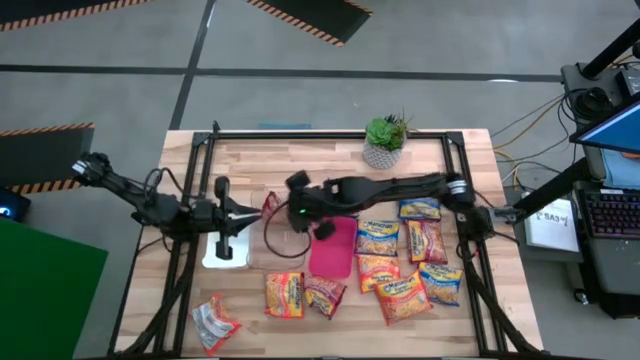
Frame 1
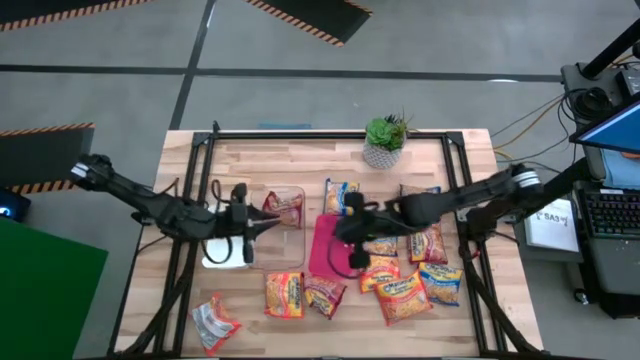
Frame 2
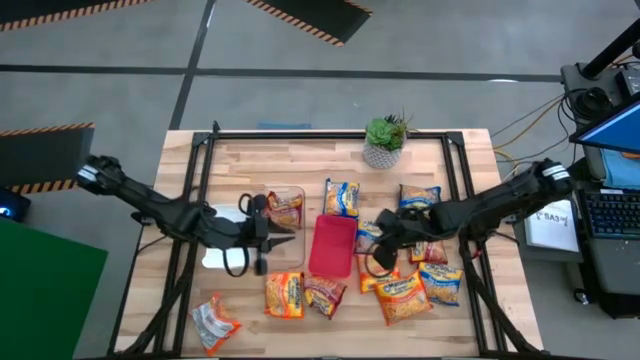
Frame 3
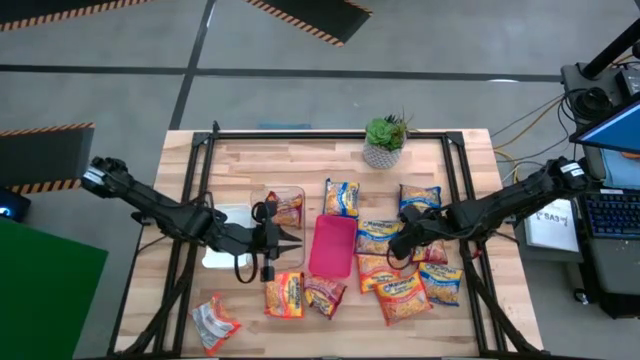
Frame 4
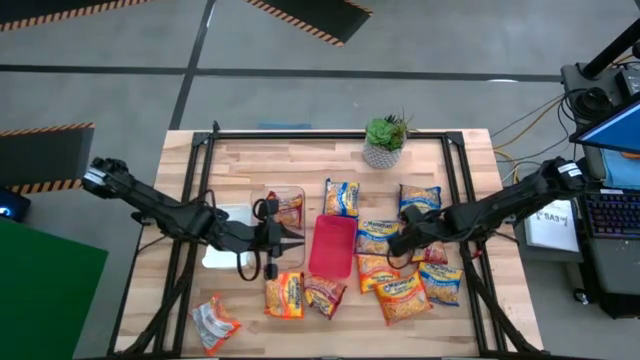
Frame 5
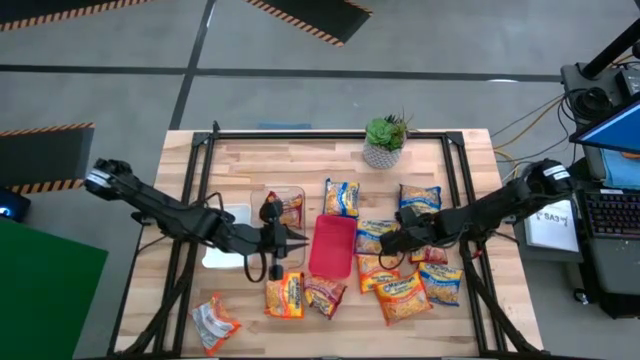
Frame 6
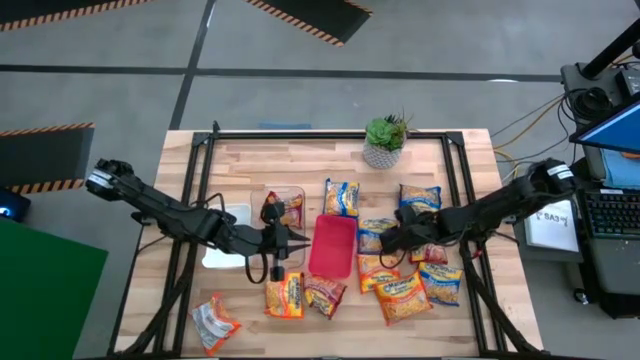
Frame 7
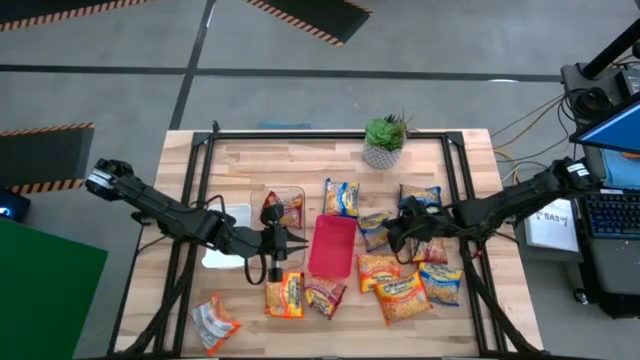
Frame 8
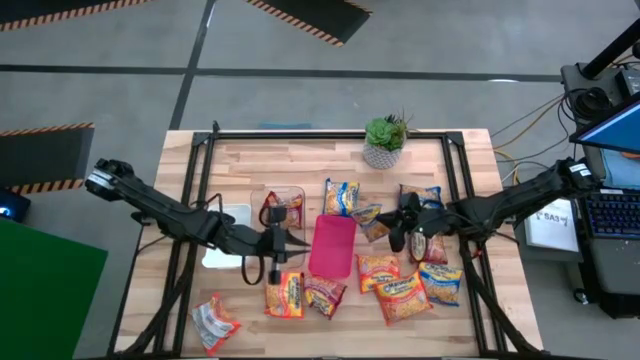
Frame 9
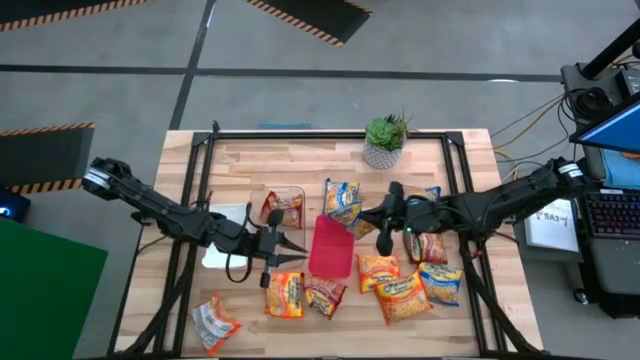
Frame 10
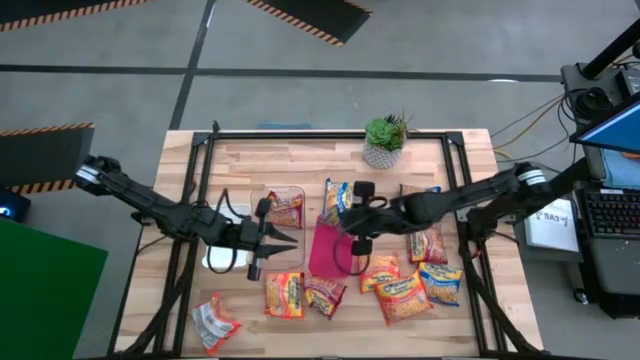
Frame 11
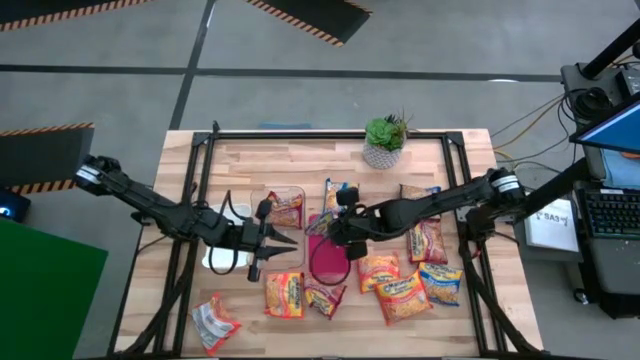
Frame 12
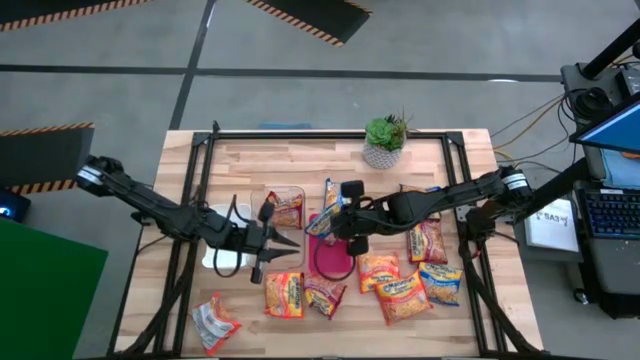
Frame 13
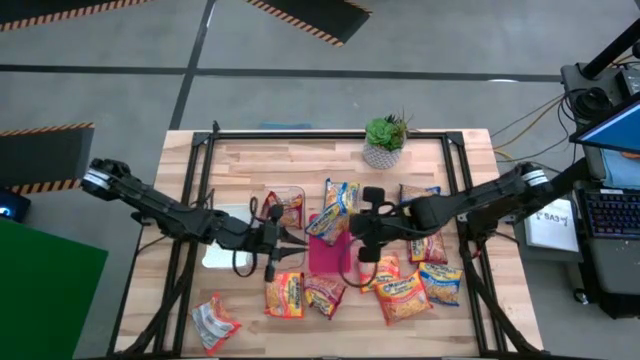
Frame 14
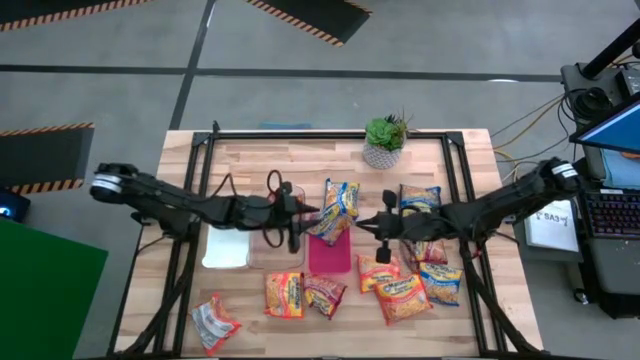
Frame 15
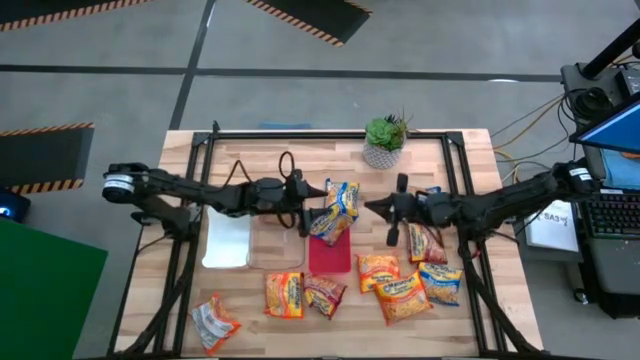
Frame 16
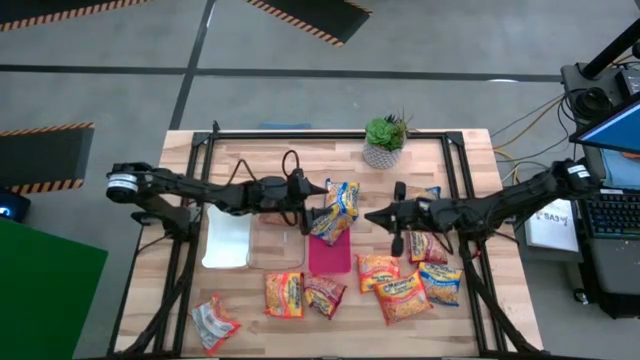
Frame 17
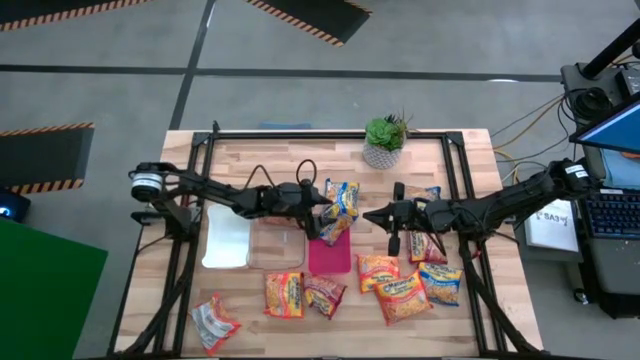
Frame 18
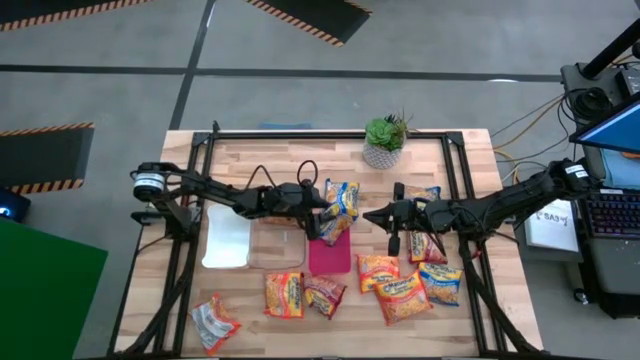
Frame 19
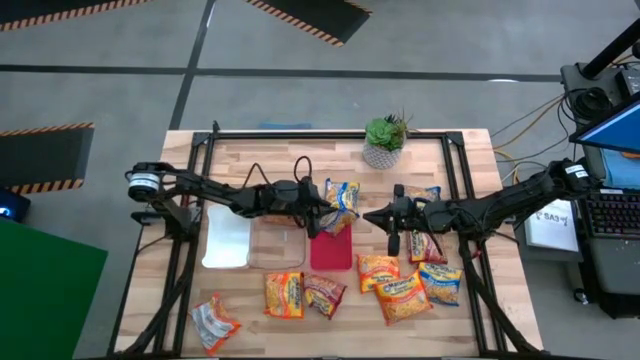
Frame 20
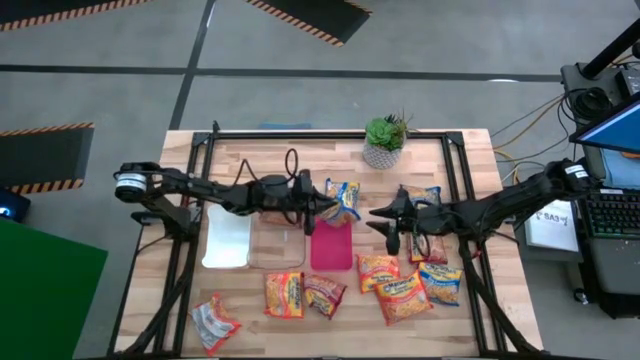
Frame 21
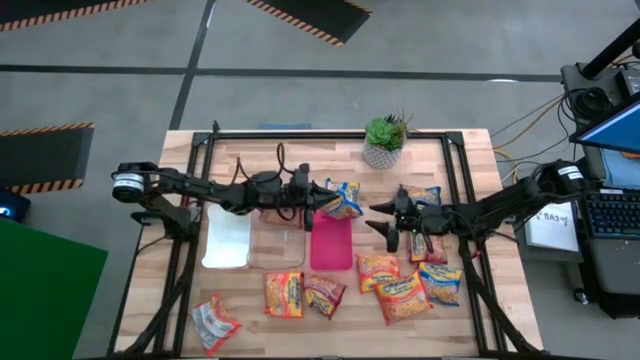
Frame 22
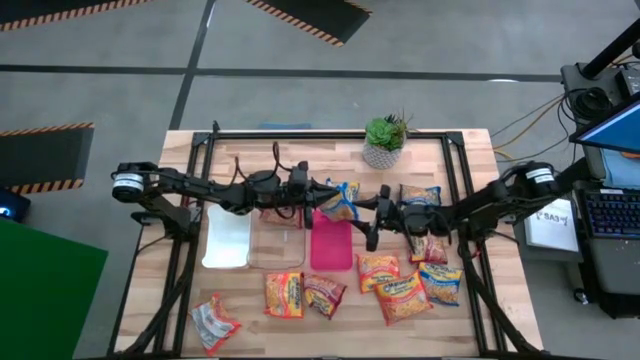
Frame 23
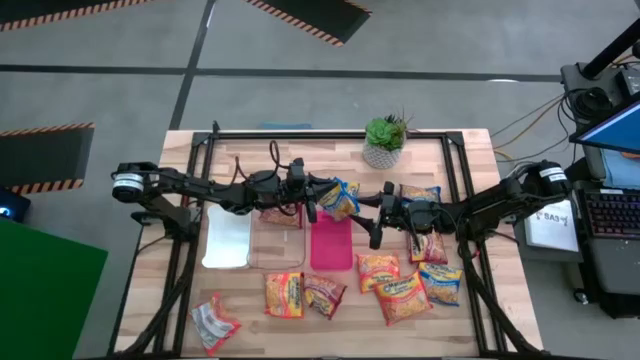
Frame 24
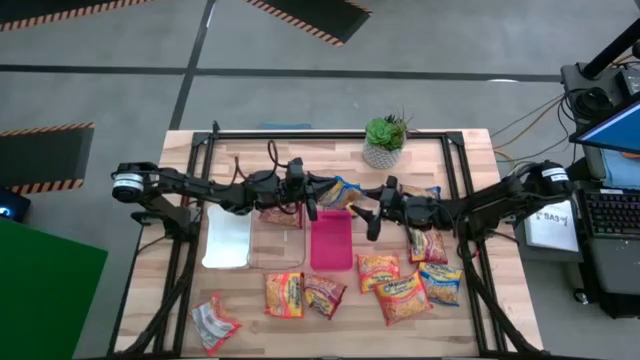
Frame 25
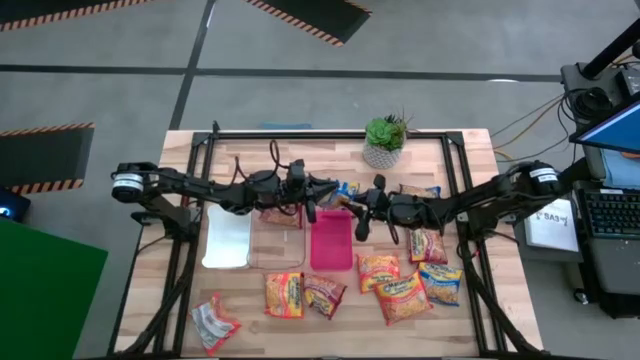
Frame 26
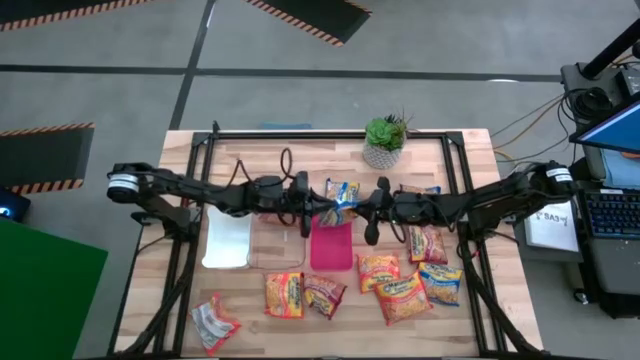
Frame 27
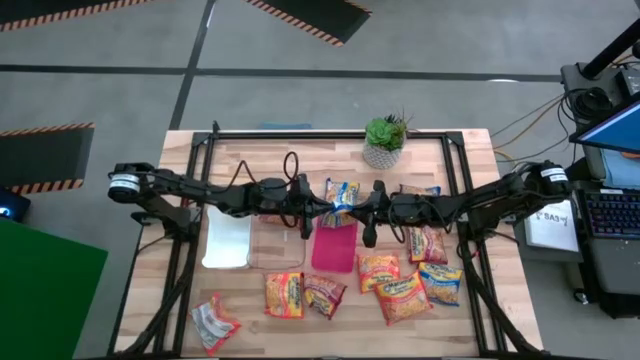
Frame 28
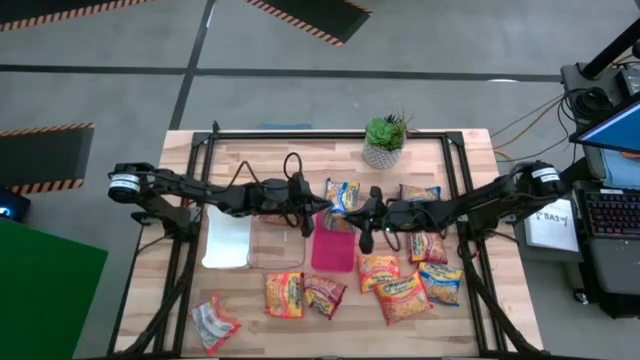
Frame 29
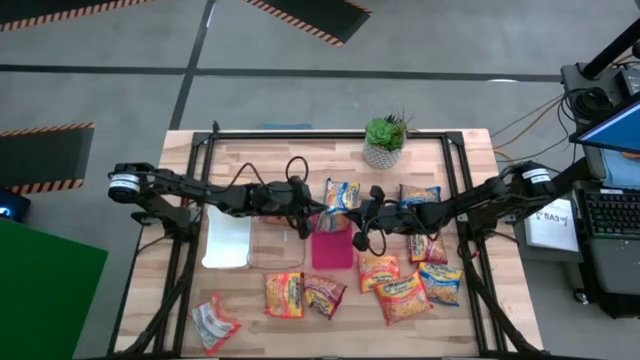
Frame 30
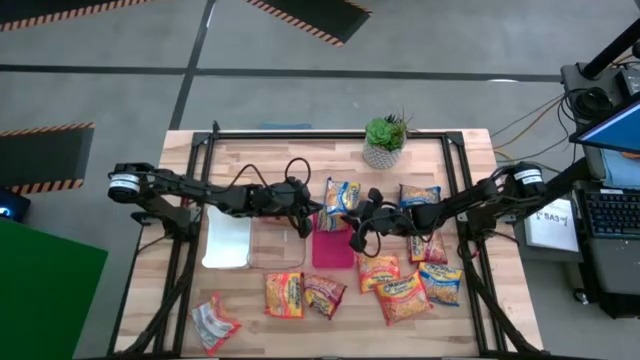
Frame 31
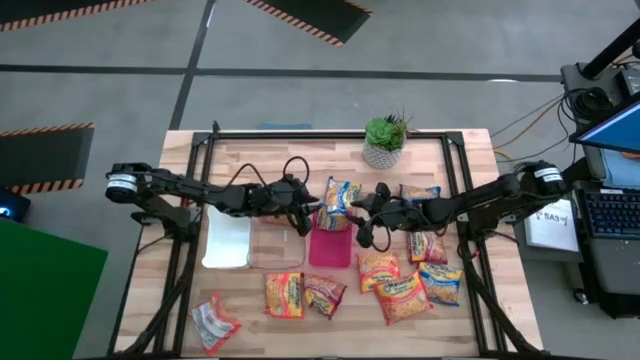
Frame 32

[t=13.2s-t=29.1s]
Task: Sort Maruchan noodles
Put the blue noodle pack into the red bin

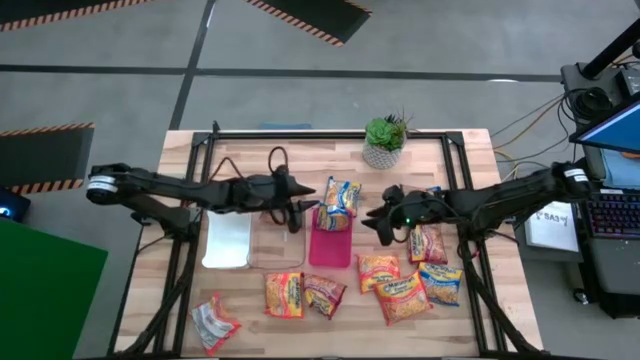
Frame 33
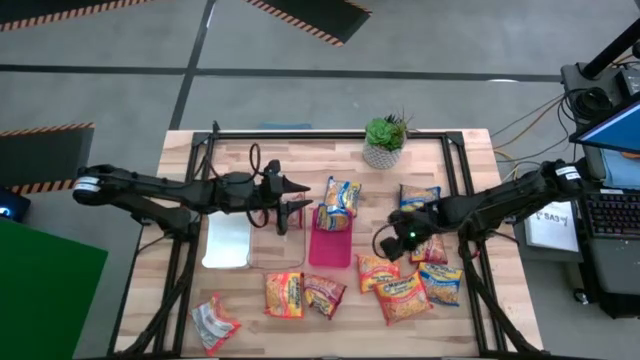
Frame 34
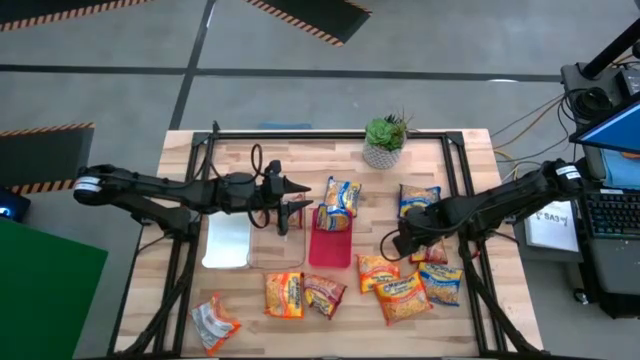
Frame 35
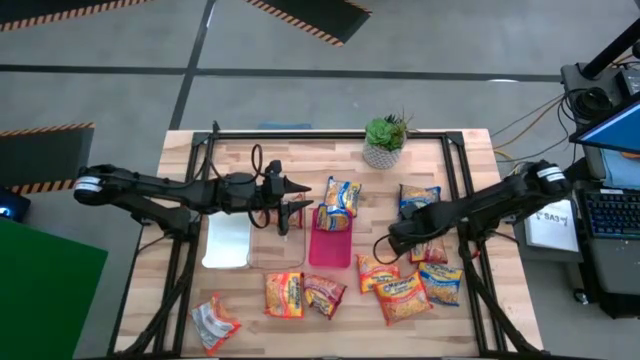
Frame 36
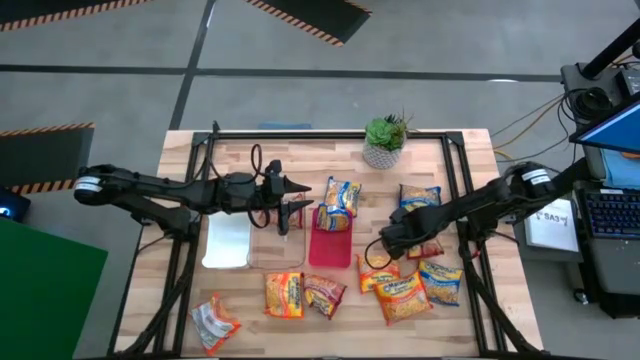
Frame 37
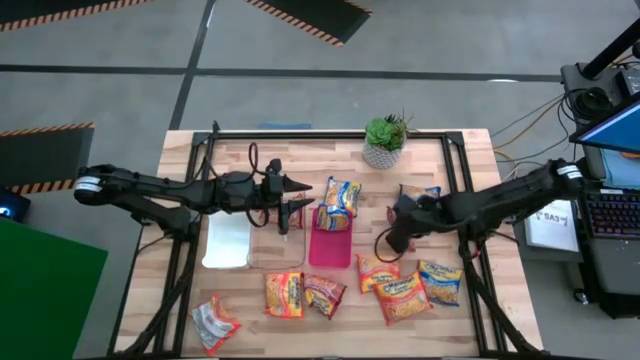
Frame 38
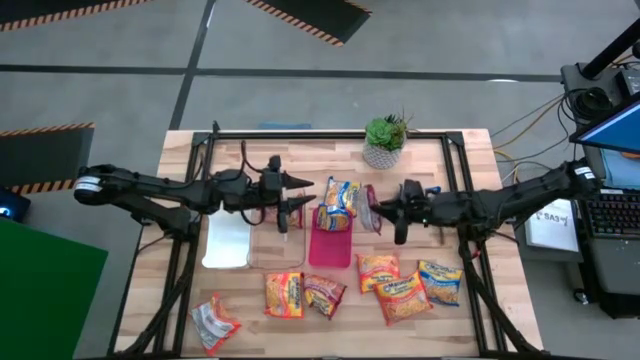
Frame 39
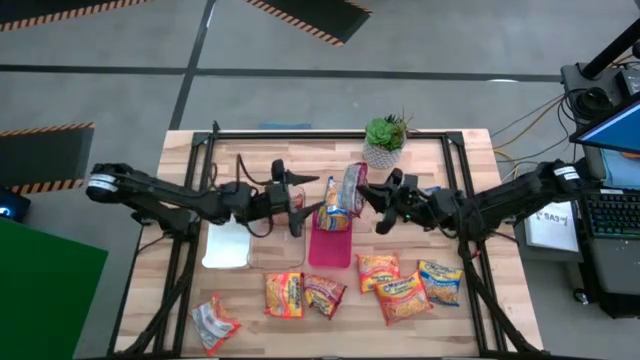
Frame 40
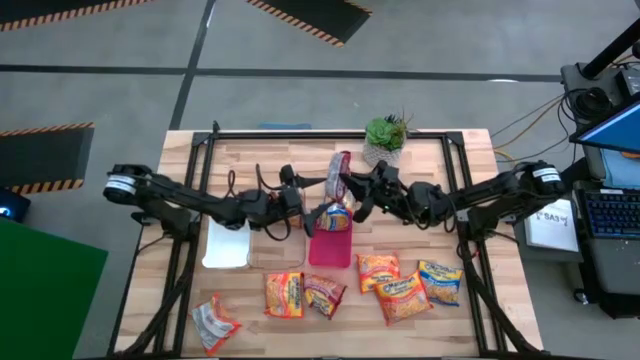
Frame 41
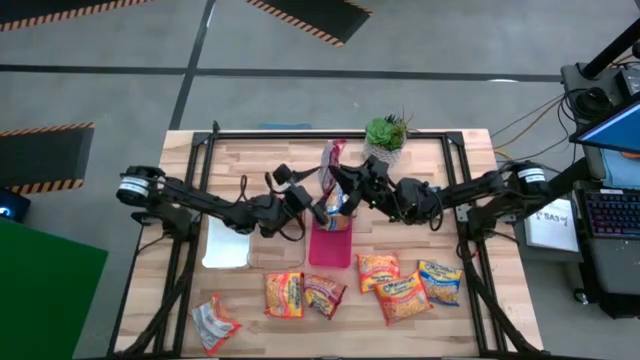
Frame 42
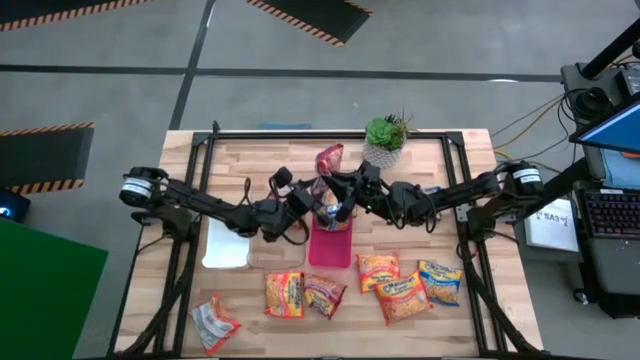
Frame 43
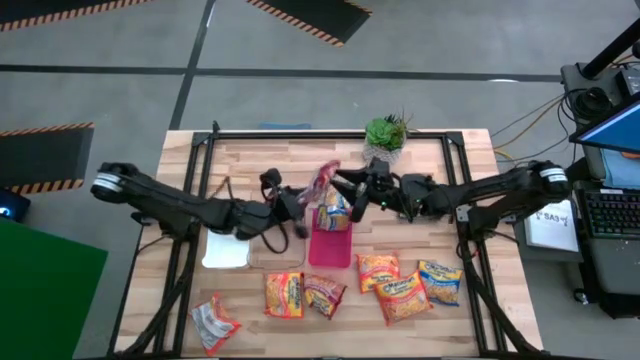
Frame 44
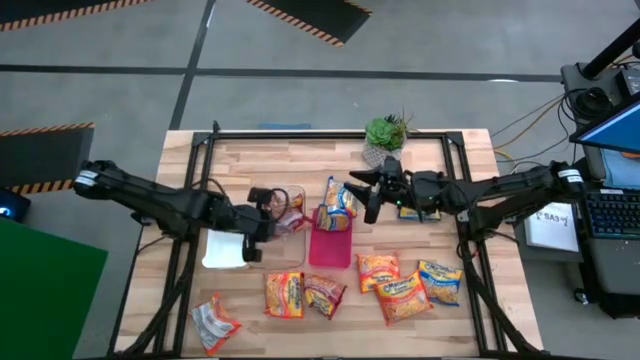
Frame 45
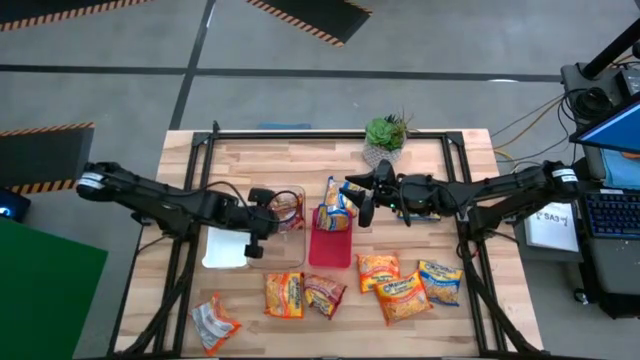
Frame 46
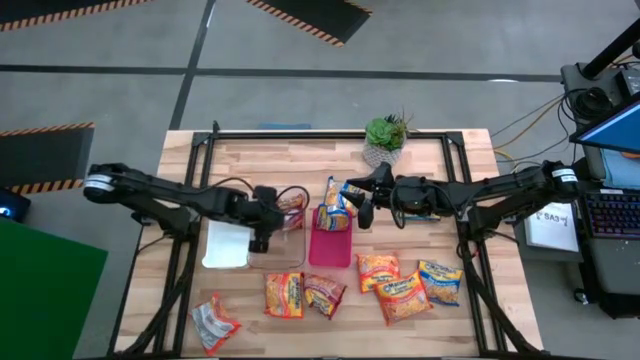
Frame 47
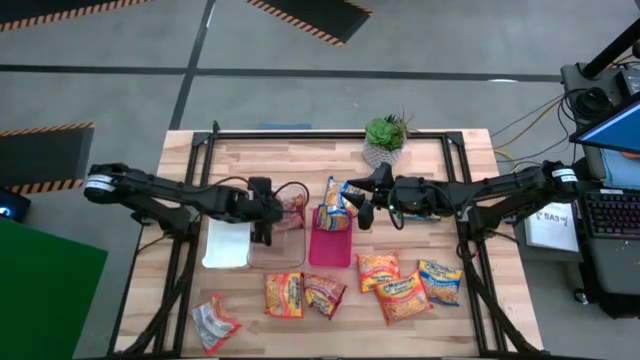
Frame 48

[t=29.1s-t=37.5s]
Put the red noodle pack into the transparent bin
